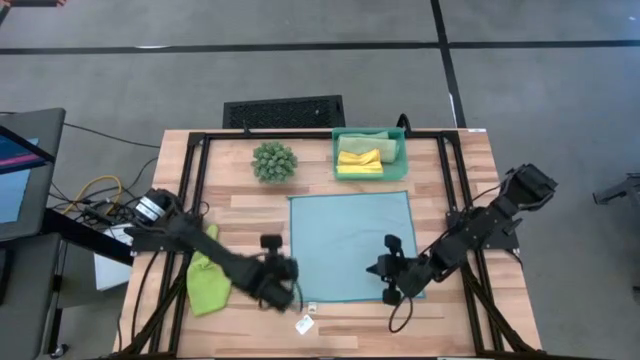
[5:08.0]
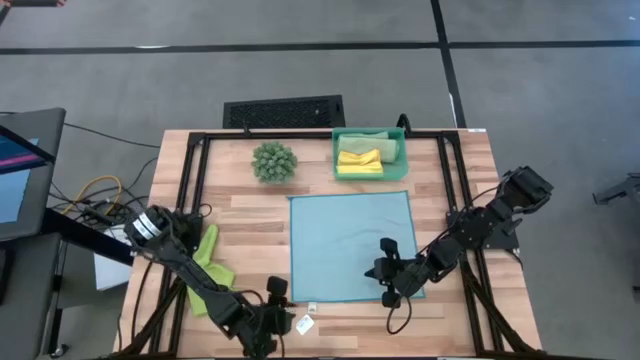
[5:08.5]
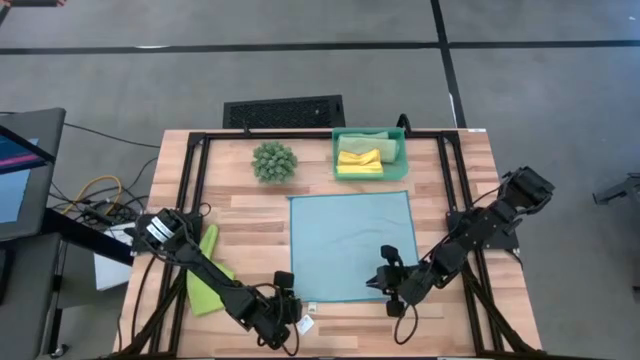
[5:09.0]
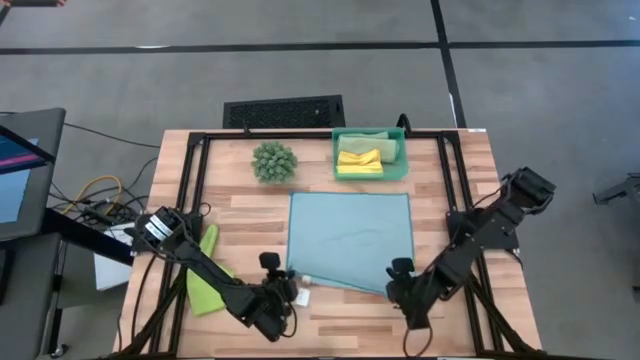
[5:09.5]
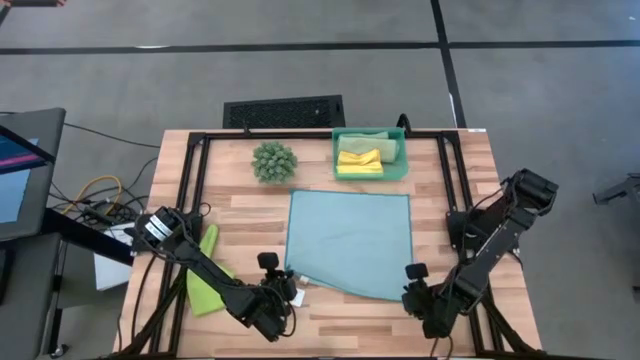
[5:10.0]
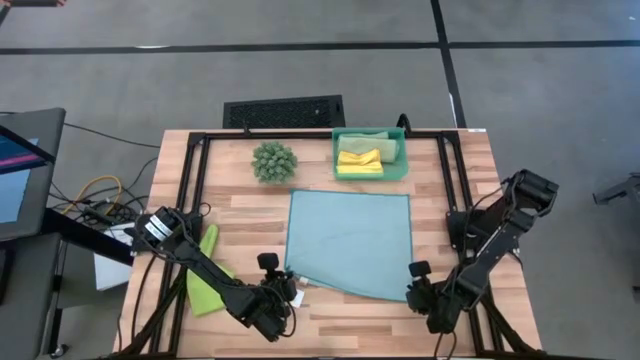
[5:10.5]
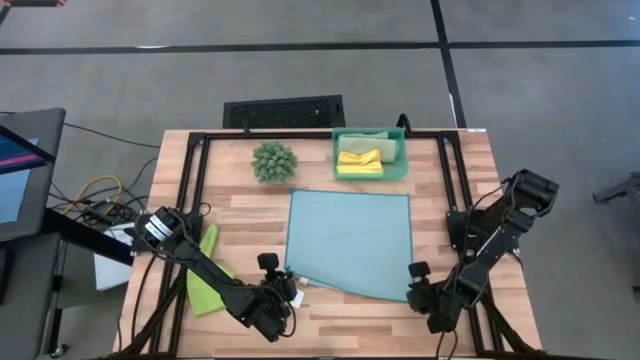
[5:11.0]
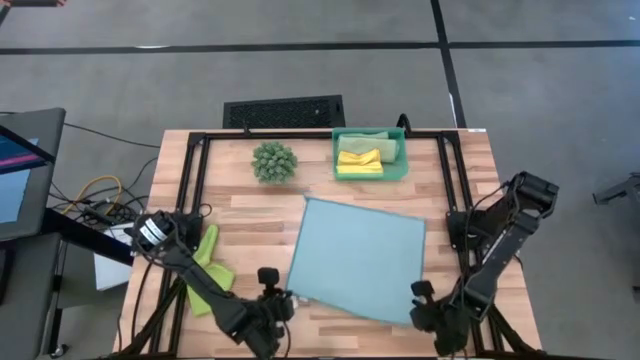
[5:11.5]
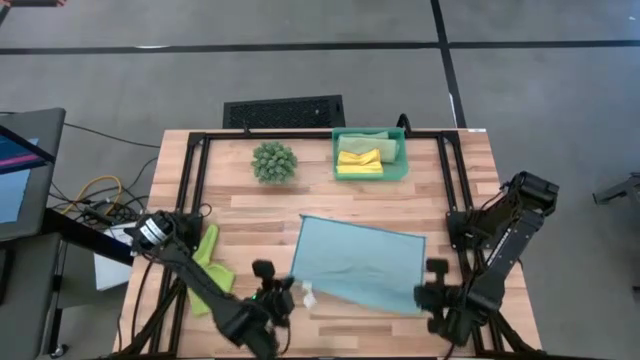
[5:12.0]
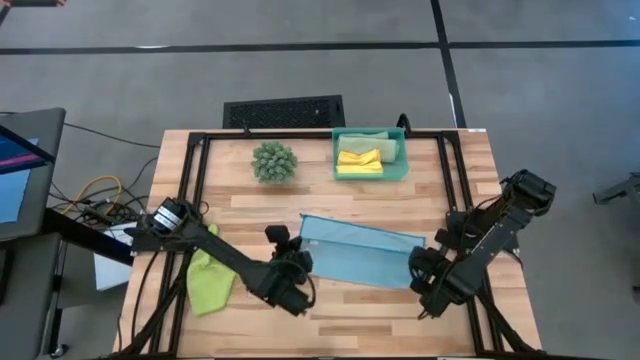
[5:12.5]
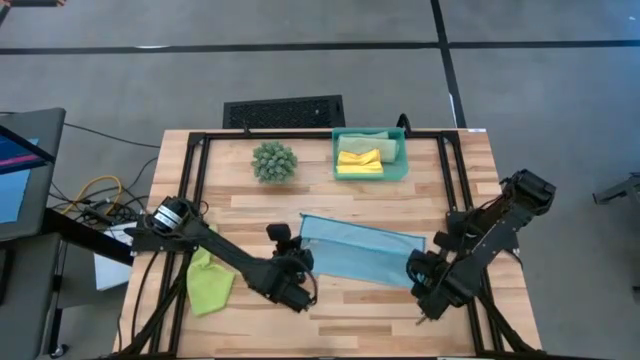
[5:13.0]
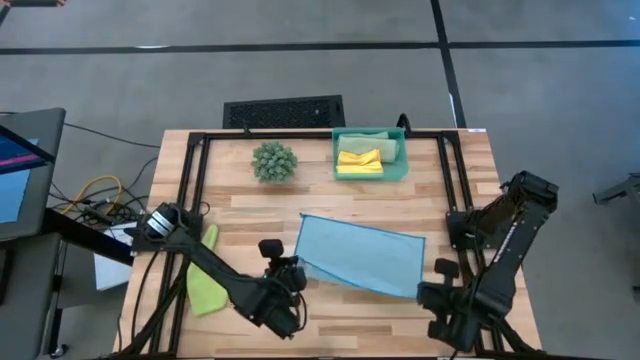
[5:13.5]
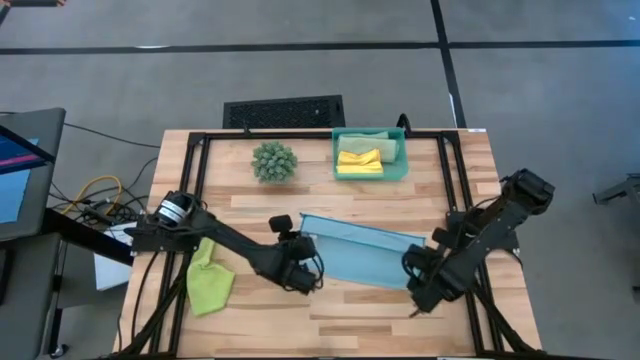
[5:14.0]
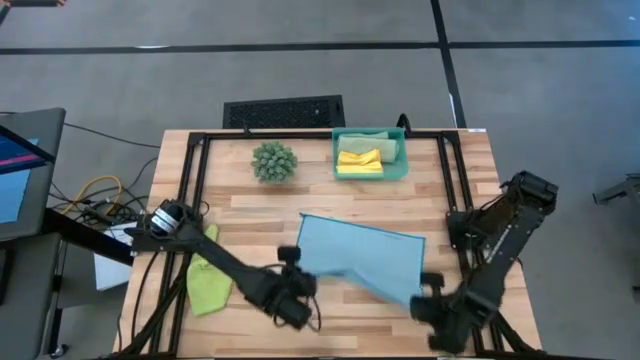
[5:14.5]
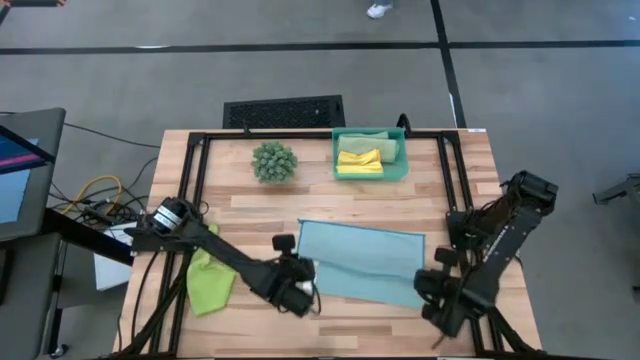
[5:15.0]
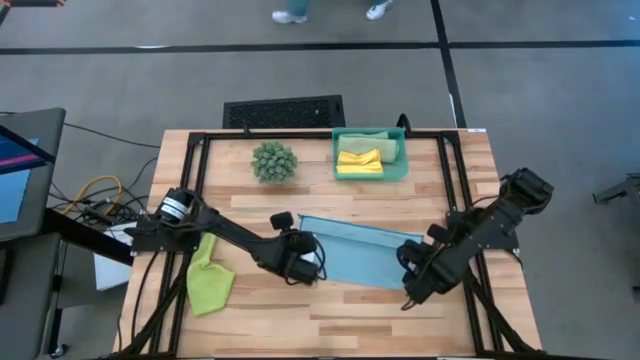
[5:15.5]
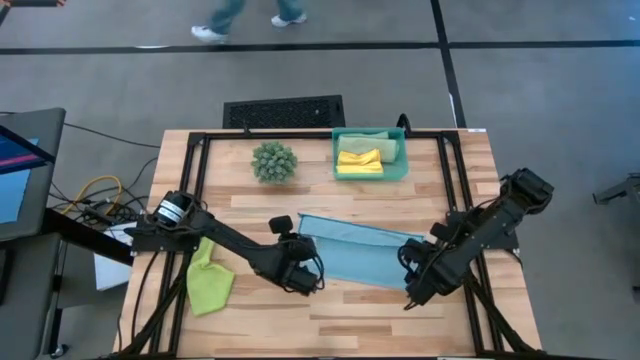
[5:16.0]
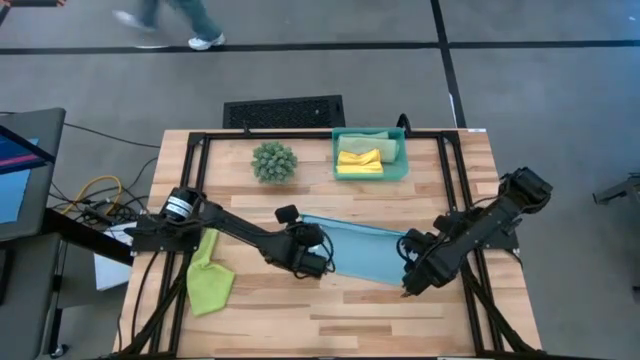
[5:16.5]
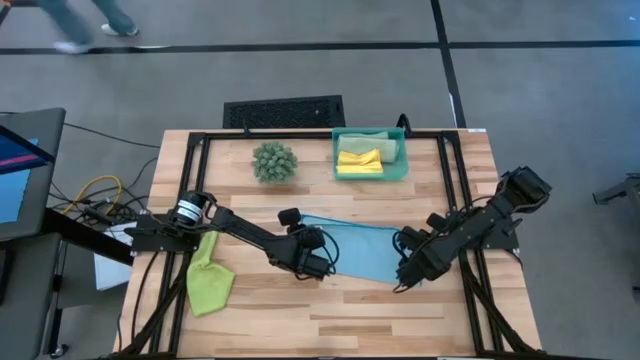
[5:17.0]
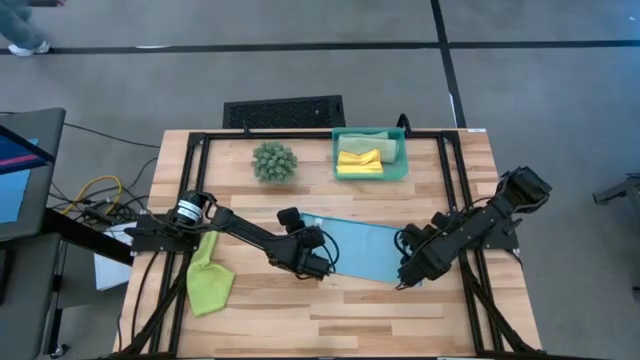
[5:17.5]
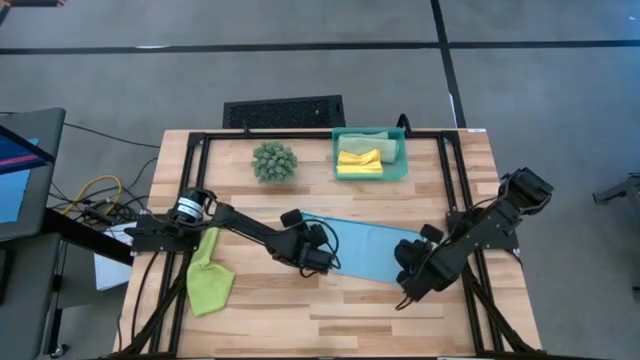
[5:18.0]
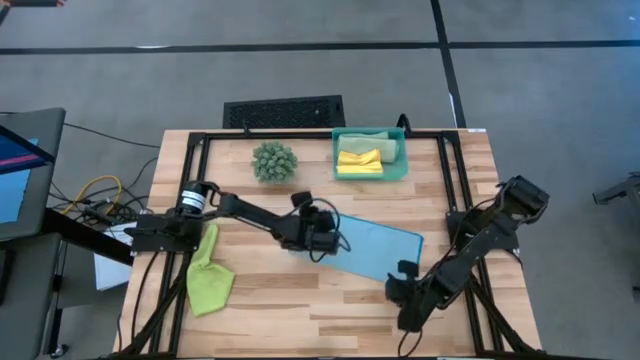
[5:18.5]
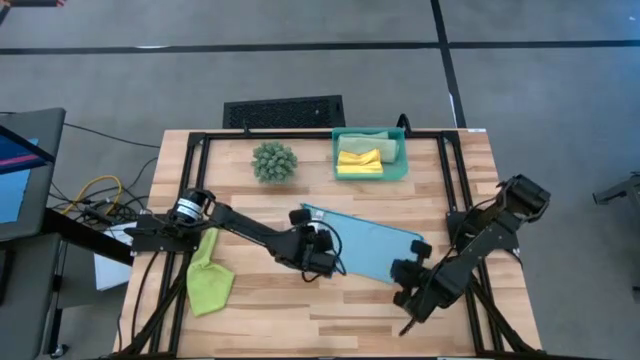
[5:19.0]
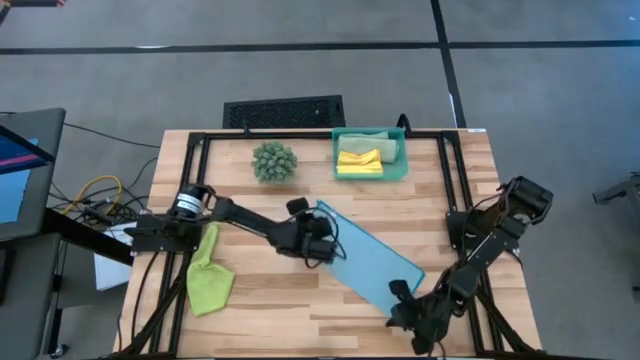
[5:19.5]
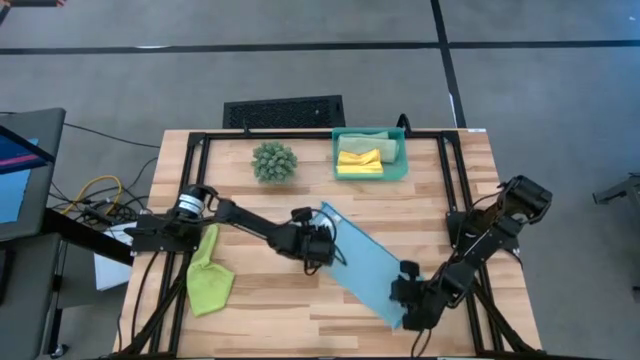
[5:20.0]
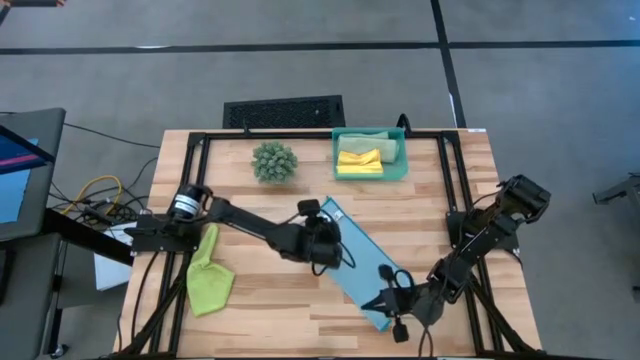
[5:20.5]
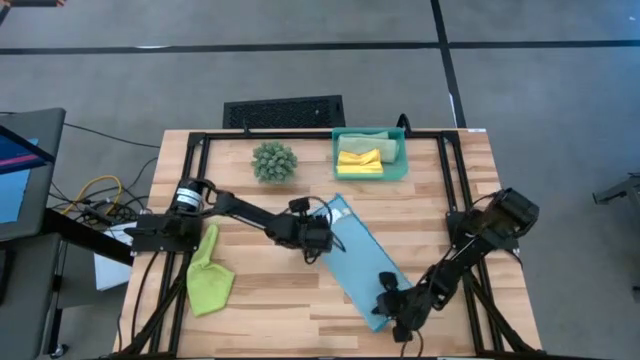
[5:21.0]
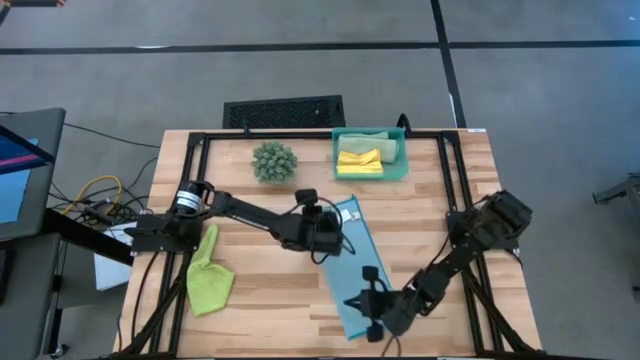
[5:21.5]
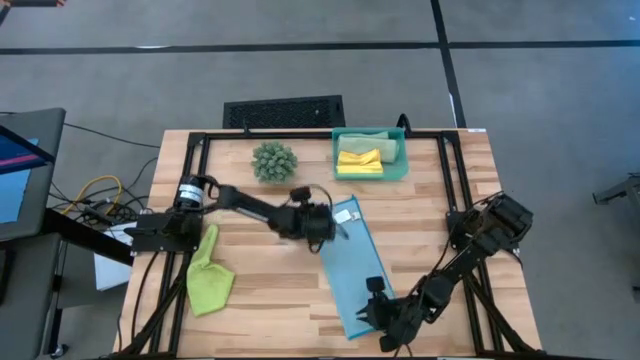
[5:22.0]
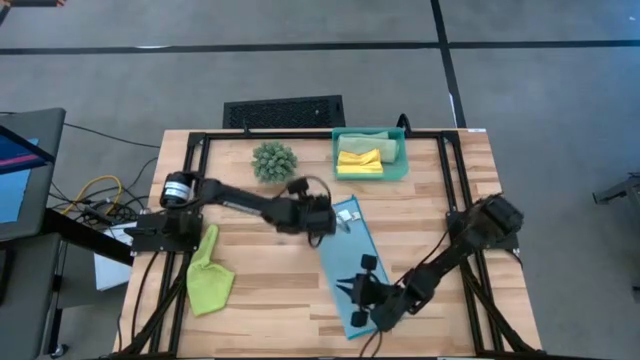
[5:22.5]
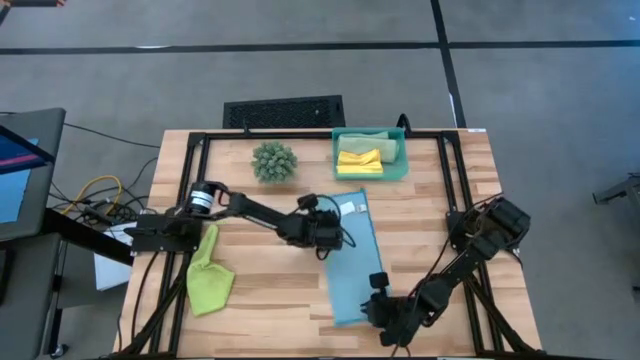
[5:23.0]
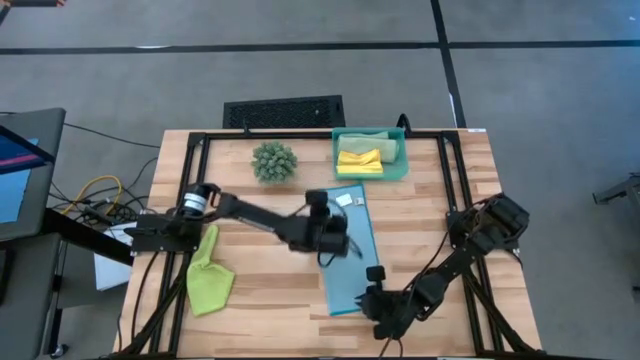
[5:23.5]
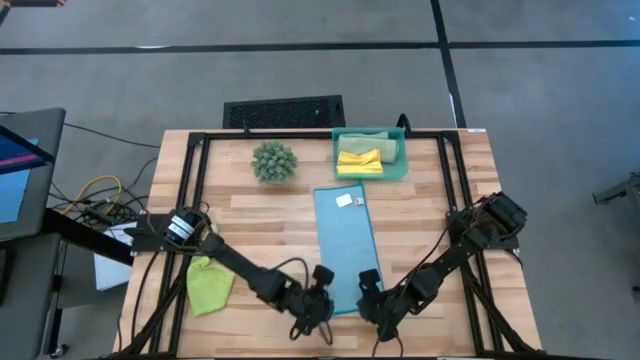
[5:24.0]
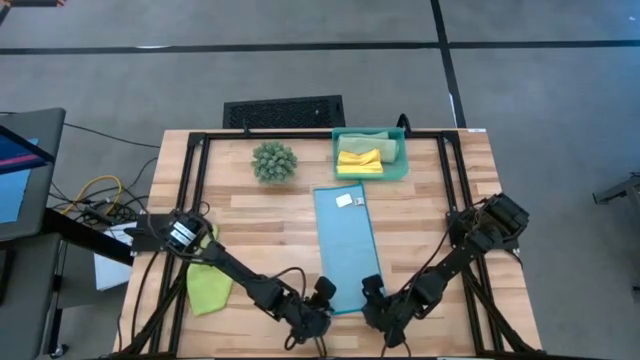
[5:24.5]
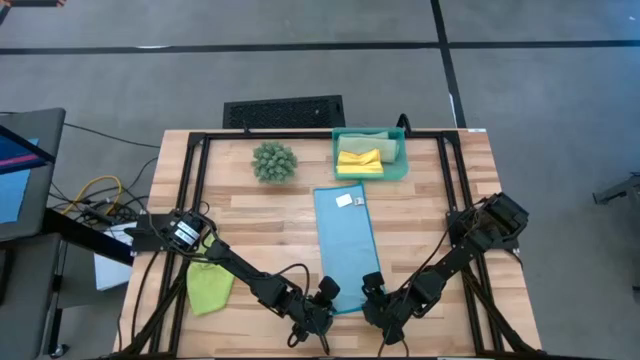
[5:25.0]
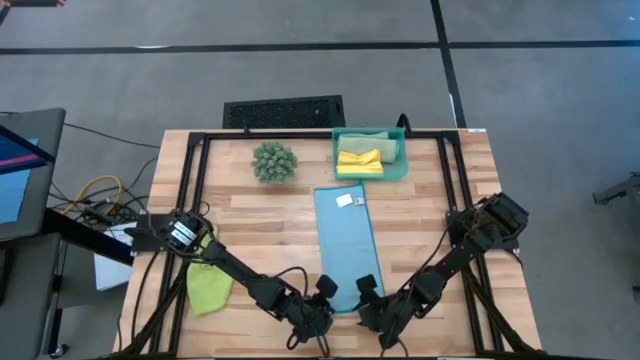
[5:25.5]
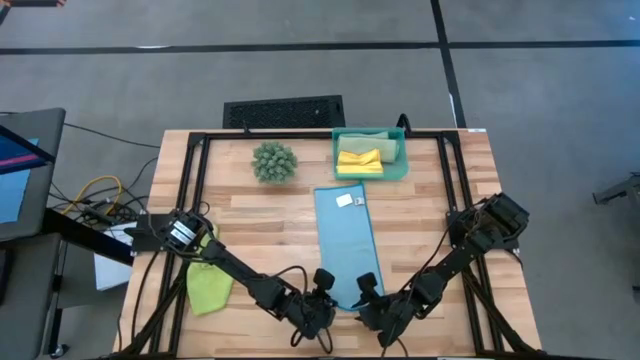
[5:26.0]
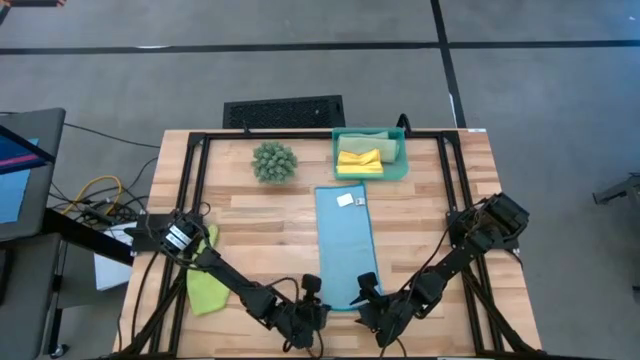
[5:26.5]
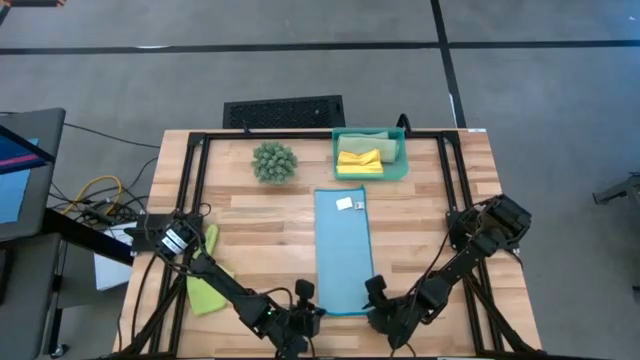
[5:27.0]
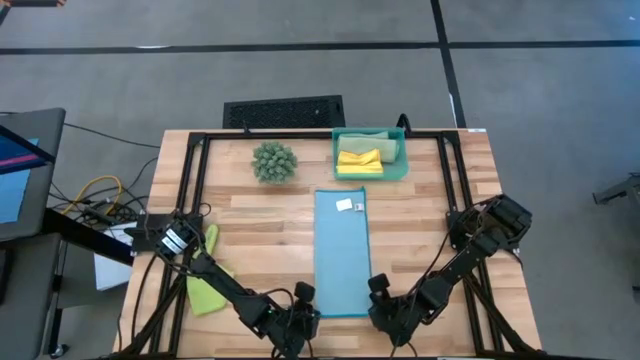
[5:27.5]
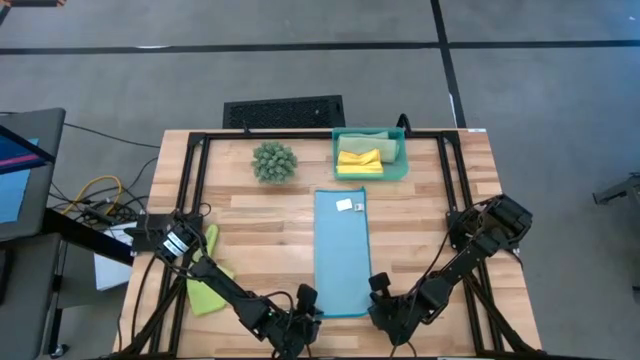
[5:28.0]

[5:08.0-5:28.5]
Task: Roll microfiber towels into tight, uniform cylinder then place into a basket
Roll the blue microfiber cloth

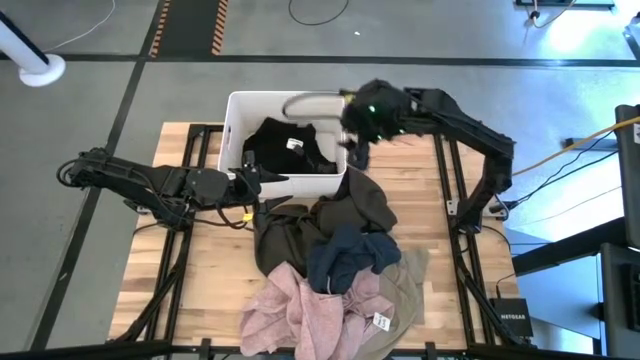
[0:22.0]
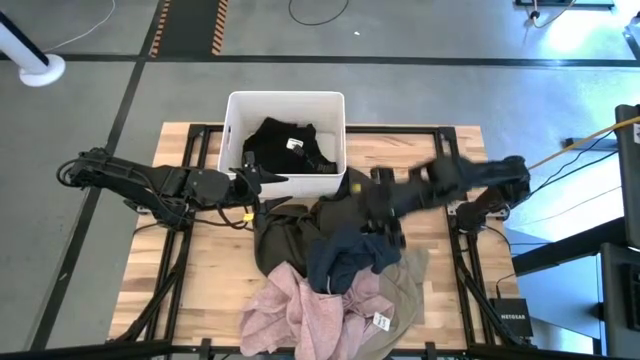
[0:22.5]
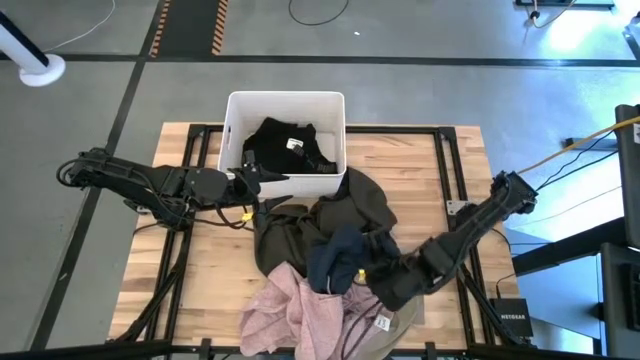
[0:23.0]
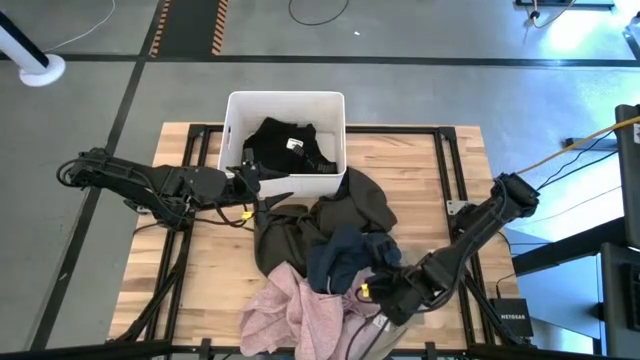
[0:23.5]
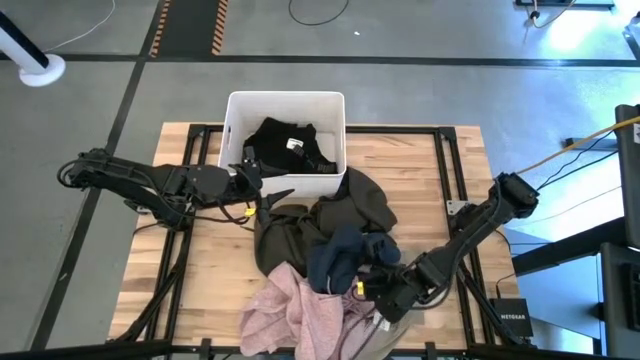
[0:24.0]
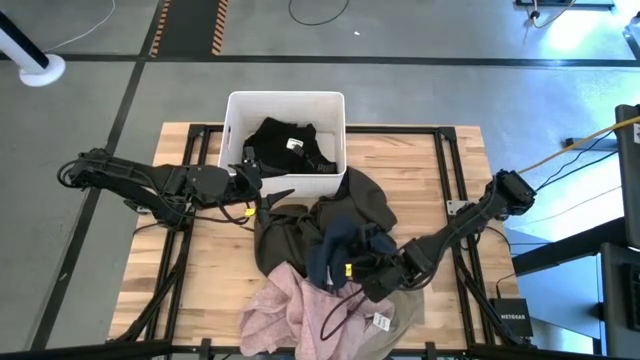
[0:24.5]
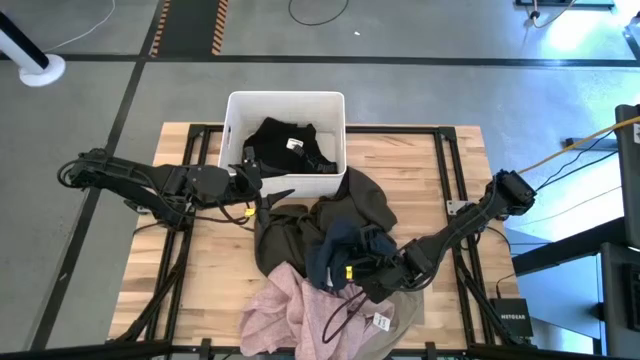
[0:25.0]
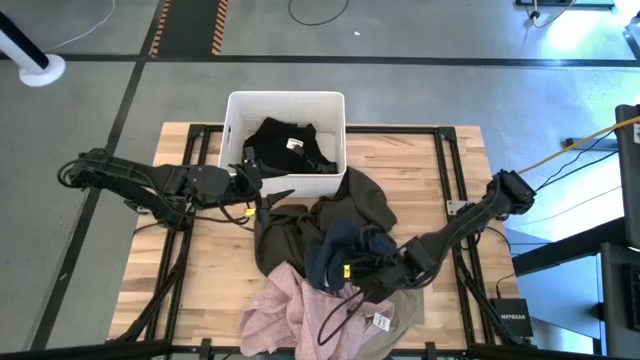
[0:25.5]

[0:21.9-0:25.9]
Task: Sort clothes
Put the blue shorts into the white laundry bin
